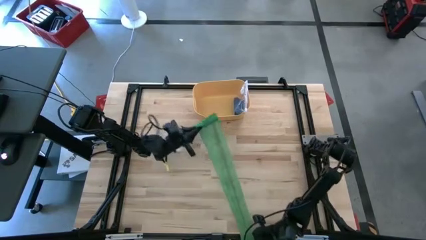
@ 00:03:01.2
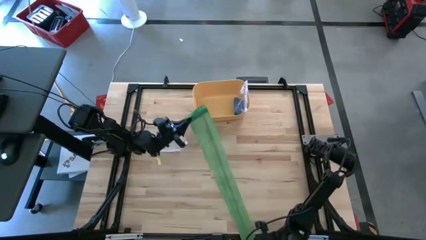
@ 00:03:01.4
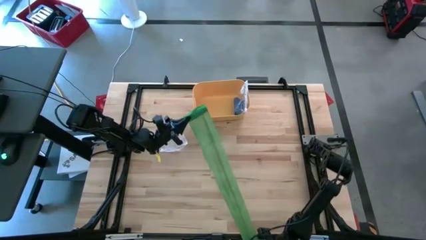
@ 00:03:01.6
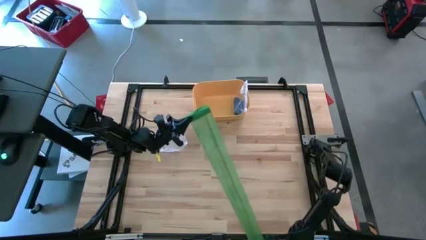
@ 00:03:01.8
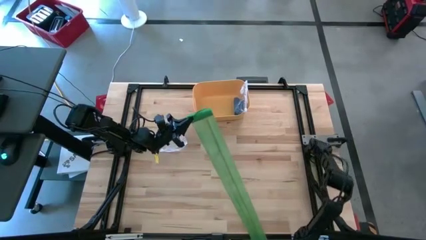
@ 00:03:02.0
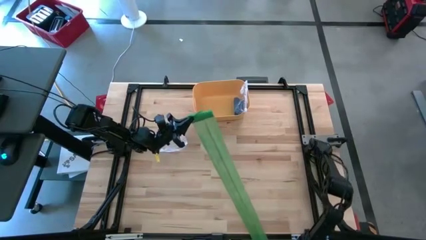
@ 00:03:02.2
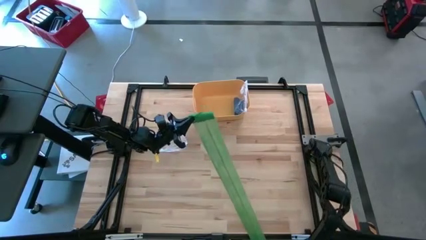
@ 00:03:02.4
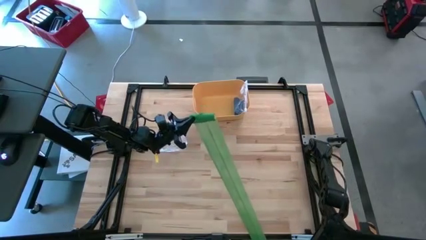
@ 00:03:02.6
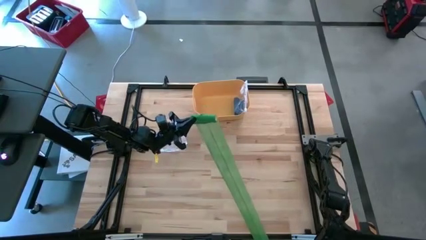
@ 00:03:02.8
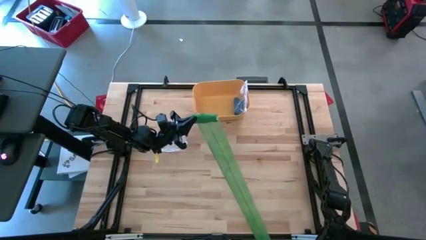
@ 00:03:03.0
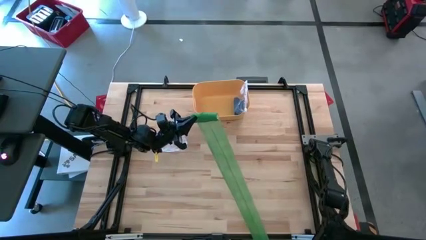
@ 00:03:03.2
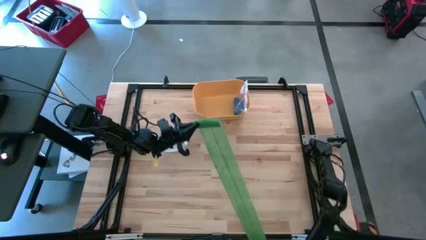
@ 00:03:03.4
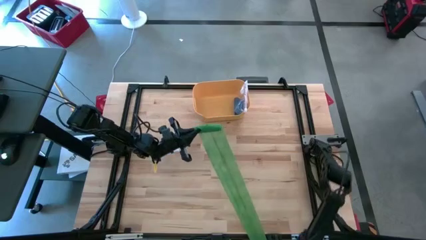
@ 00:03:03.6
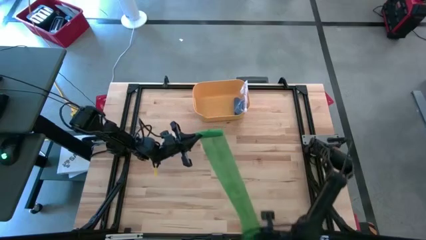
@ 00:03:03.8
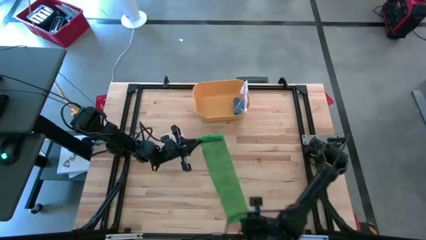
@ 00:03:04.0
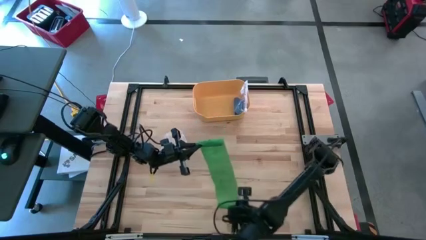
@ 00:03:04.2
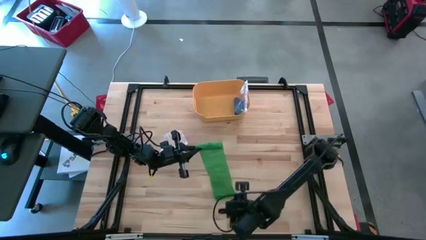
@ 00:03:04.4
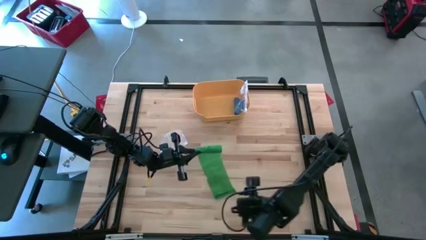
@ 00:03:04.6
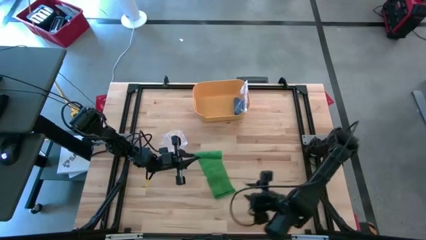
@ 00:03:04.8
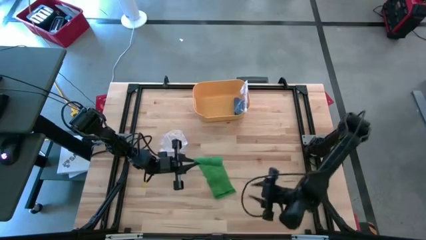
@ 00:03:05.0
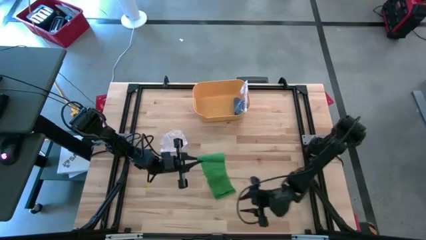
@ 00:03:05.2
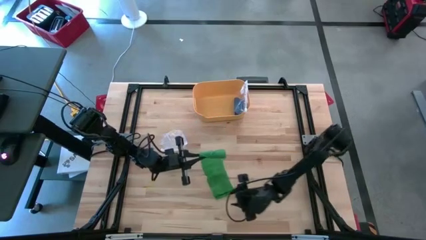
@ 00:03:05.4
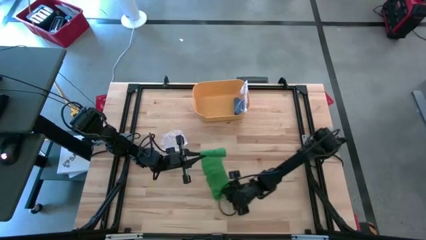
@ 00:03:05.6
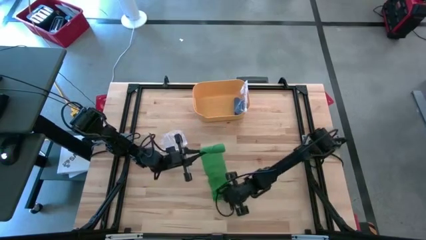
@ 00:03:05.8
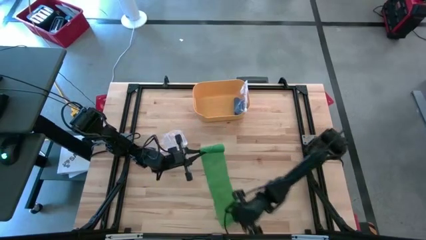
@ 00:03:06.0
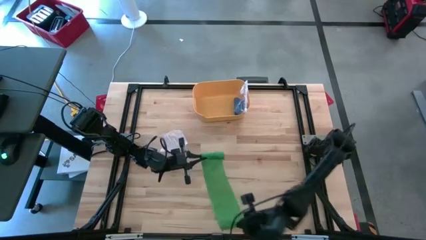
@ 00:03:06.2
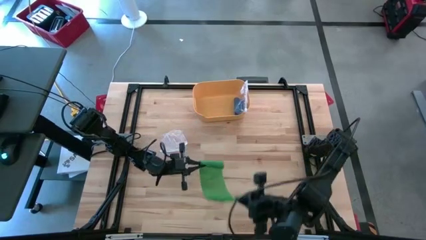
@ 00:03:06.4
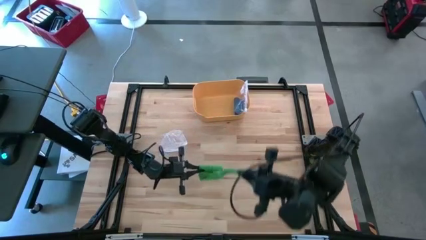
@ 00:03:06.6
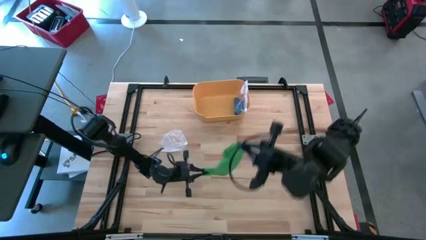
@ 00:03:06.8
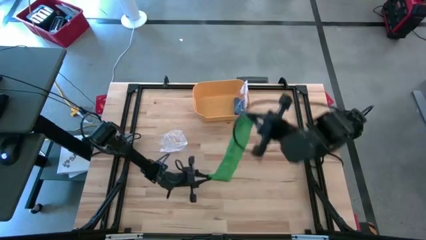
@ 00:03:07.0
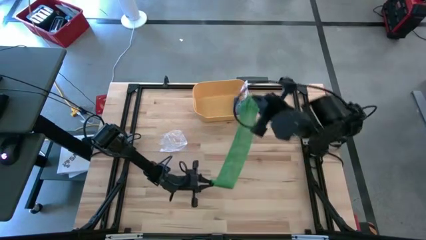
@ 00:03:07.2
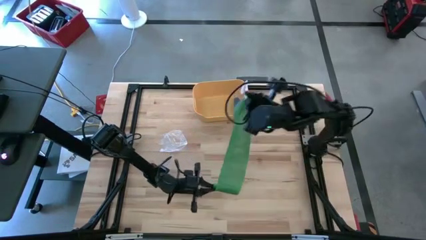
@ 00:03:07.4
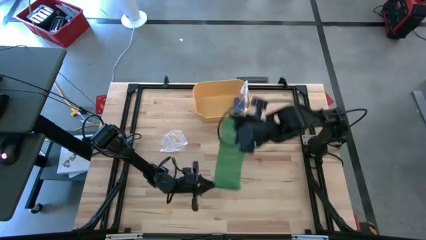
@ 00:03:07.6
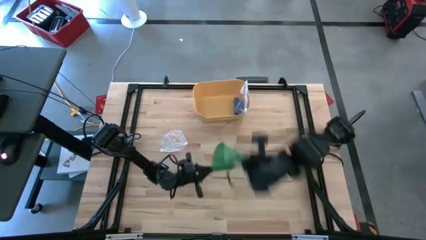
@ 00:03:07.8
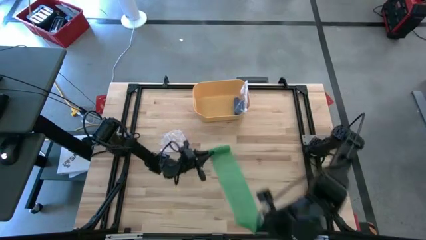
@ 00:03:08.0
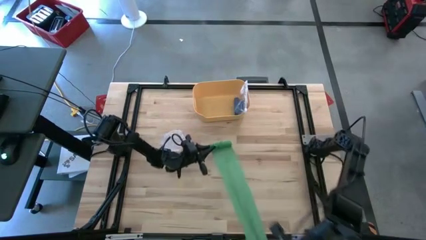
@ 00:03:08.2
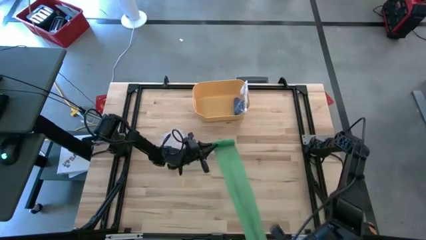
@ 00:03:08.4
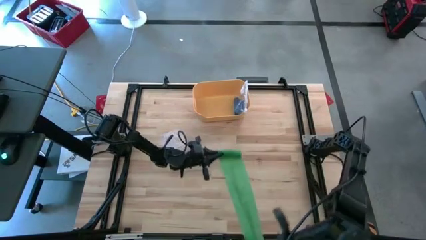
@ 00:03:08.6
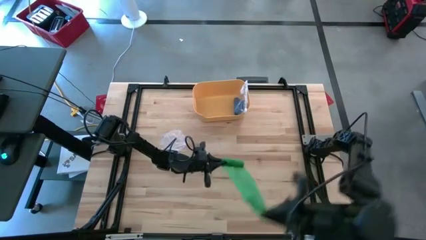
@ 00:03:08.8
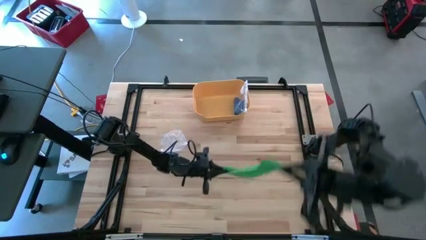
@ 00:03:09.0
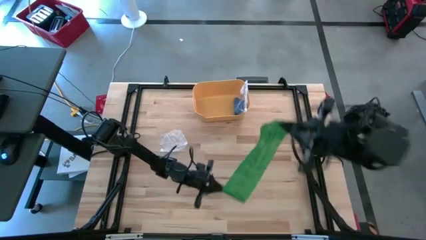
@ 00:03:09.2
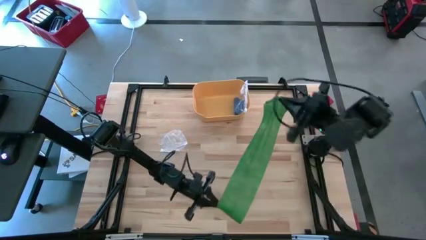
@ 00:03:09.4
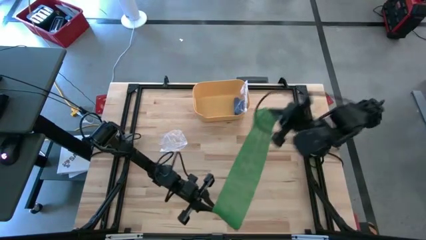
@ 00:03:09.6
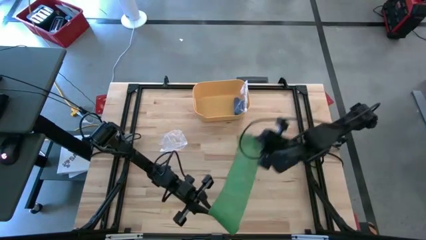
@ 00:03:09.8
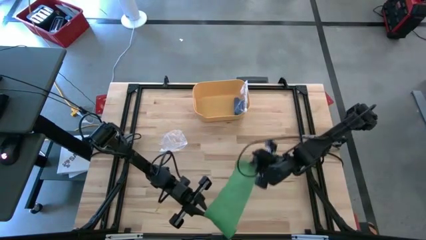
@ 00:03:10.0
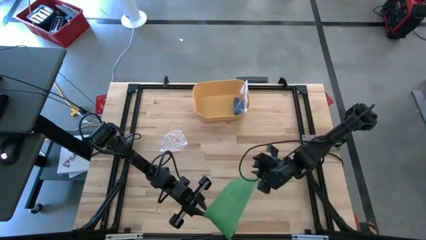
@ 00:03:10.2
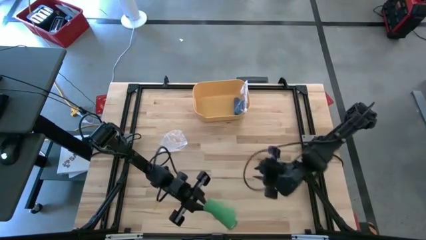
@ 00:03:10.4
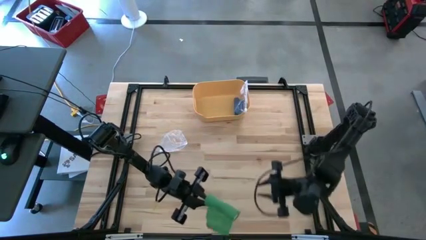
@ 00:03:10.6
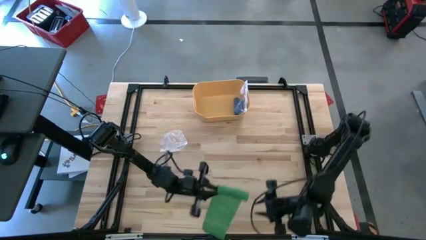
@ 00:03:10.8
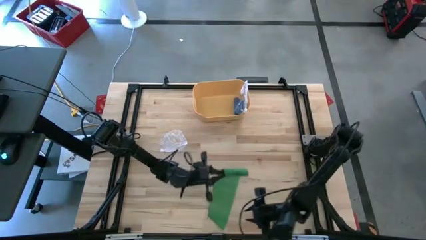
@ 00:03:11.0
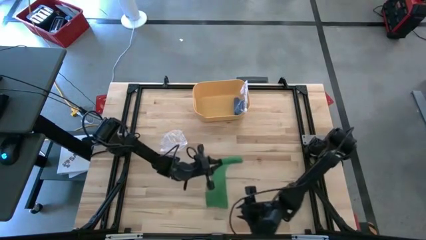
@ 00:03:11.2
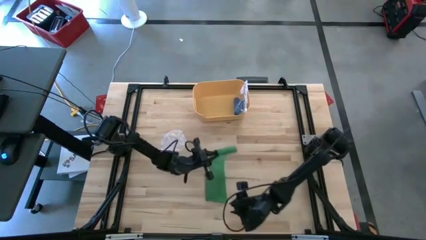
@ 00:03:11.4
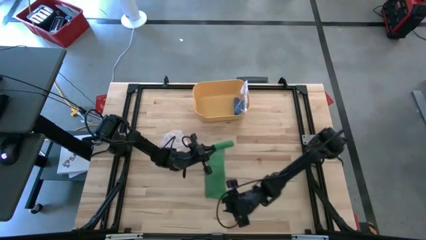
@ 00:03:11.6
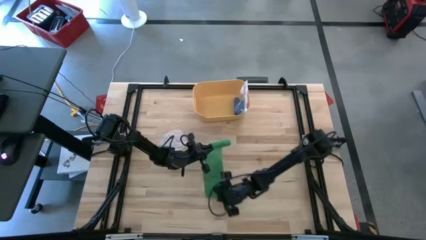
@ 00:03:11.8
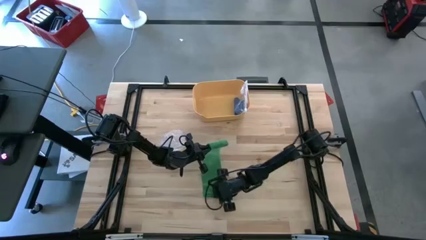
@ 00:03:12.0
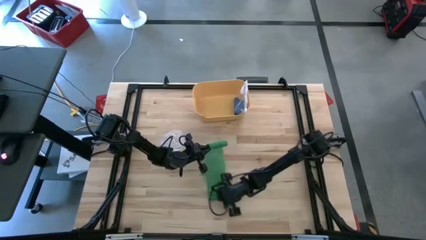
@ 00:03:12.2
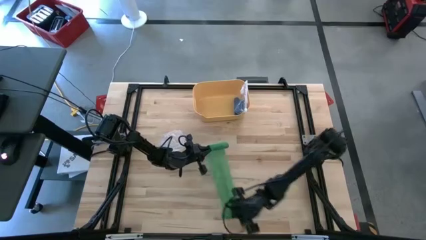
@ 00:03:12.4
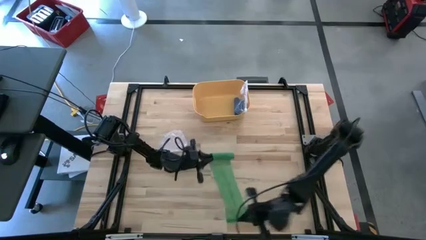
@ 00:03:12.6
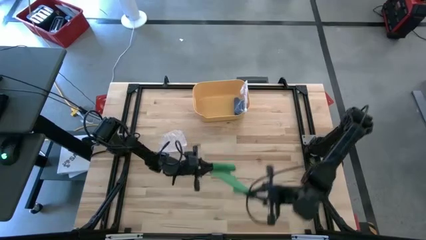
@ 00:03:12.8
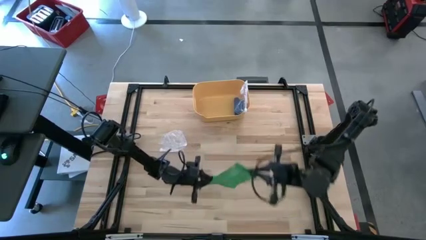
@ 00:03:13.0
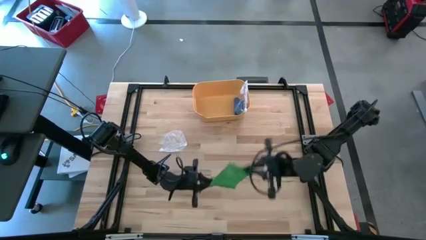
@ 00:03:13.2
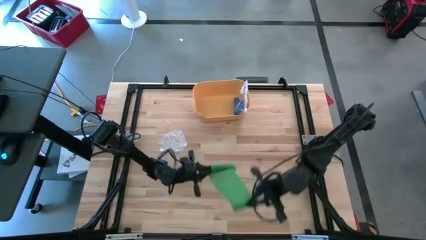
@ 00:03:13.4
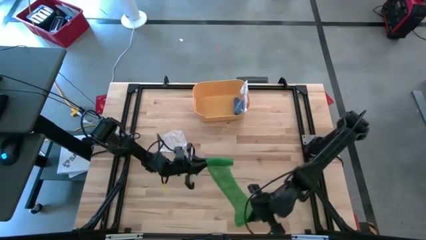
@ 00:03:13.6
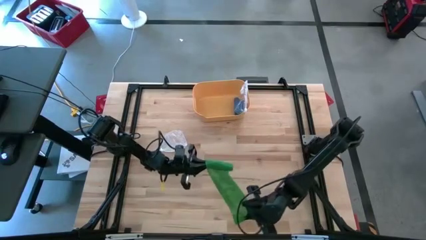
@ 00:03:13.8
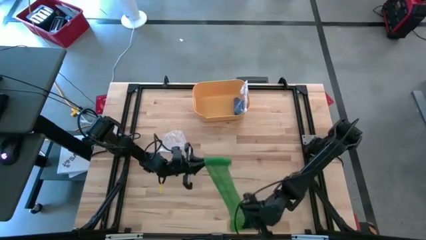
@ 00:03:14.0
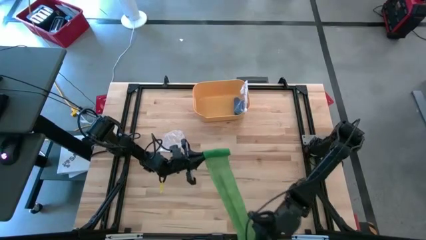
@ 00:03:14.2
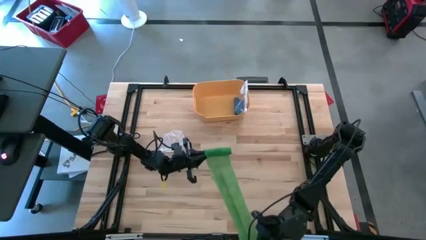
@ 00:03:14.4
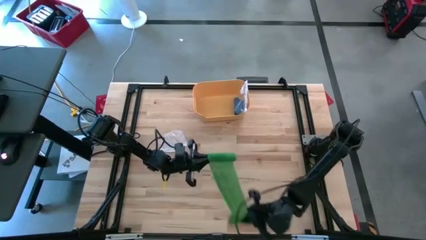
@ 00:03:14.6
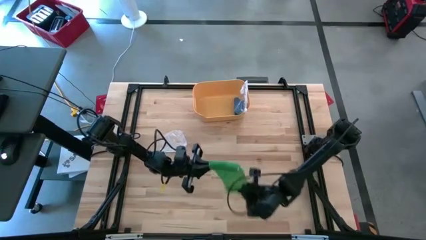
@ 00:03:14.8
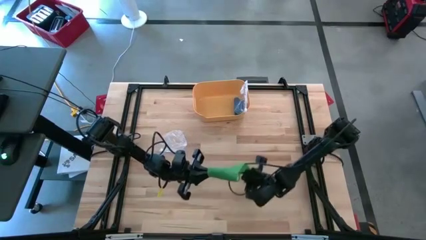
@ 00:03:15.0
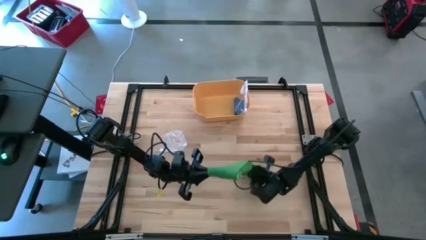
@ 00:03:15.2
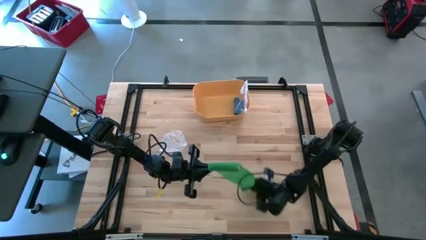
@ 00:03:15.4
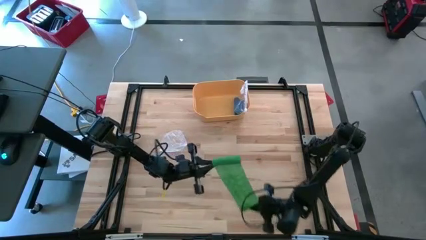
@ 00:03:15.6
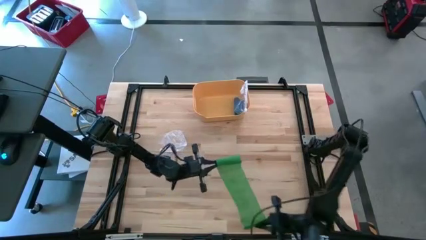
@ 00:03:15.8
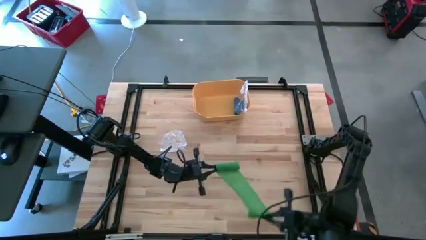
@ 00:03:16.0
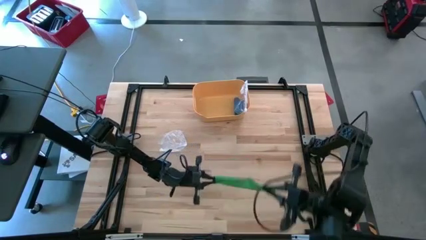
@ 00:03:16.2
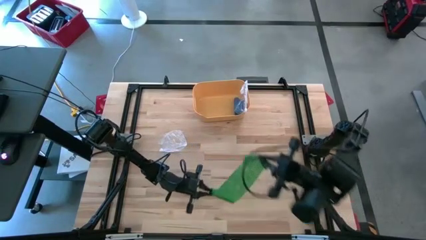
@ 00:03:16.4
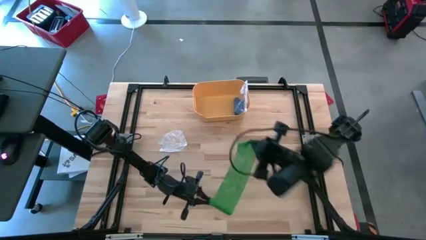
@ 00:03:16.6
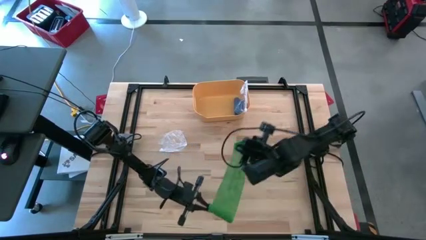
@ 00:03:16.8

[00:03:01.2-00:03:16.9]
Task: Roll bandage
Roll the green bandage
